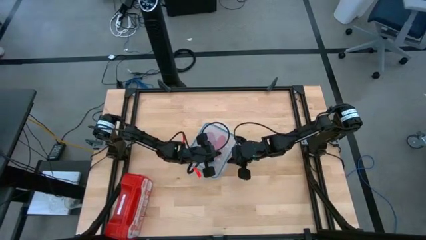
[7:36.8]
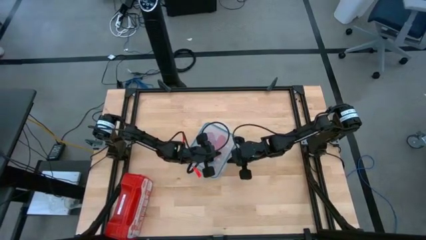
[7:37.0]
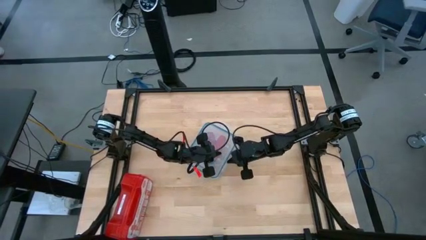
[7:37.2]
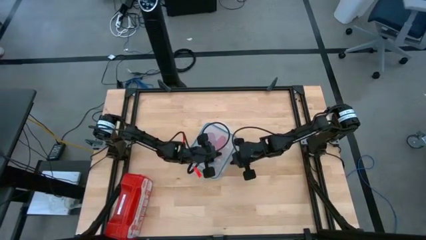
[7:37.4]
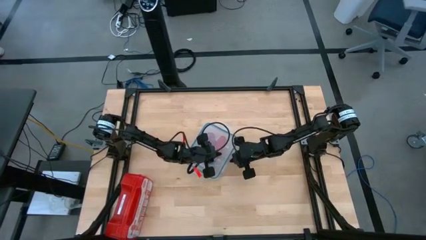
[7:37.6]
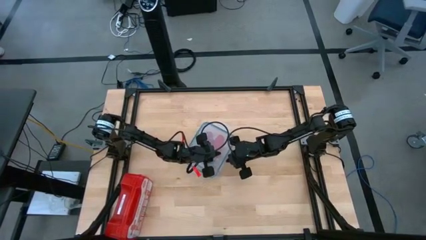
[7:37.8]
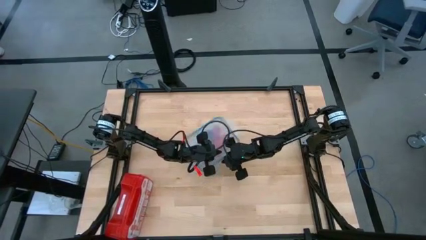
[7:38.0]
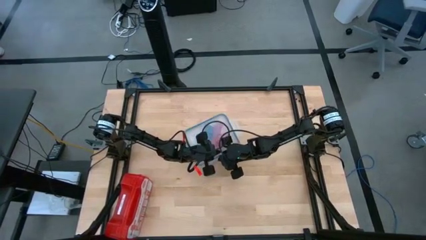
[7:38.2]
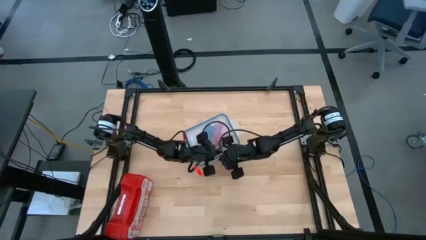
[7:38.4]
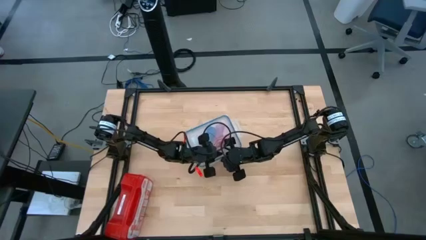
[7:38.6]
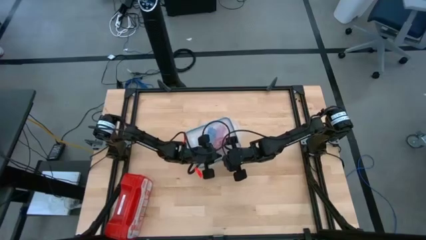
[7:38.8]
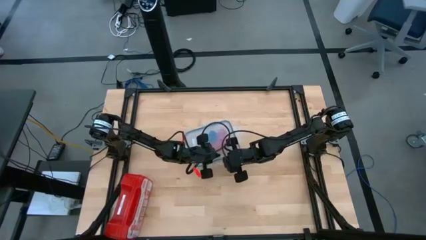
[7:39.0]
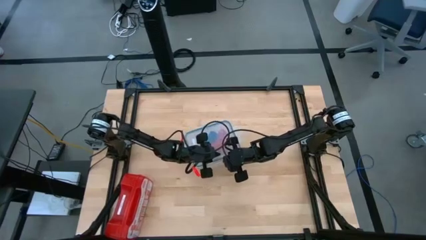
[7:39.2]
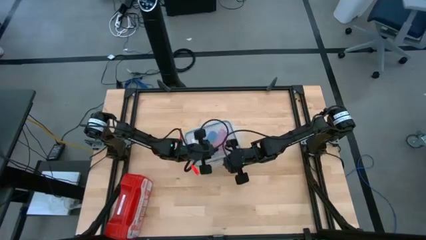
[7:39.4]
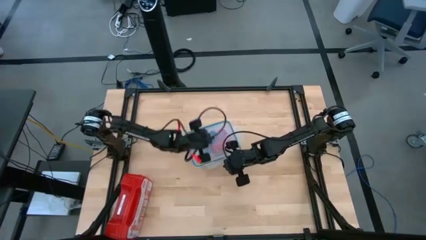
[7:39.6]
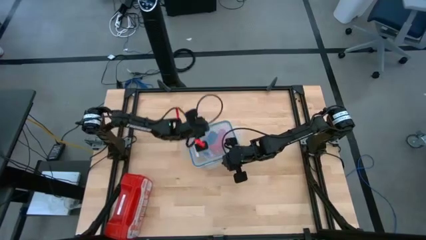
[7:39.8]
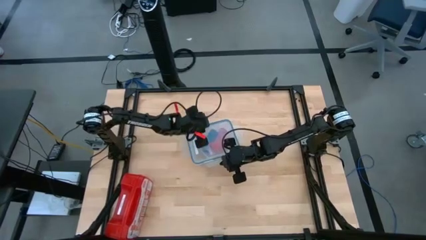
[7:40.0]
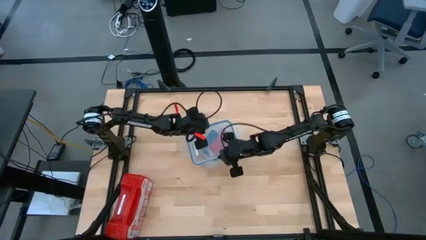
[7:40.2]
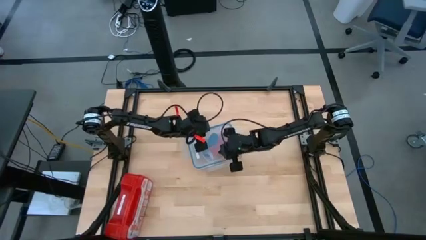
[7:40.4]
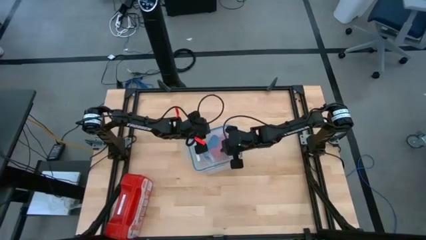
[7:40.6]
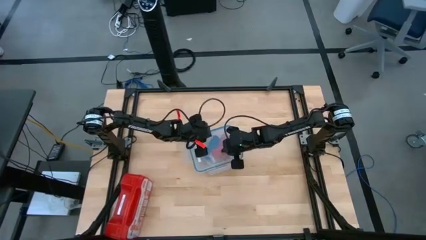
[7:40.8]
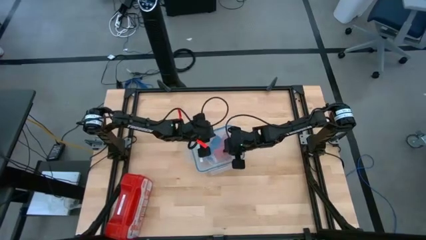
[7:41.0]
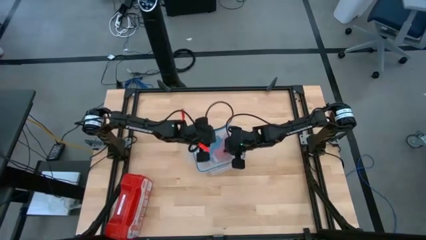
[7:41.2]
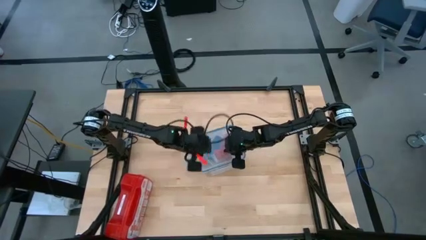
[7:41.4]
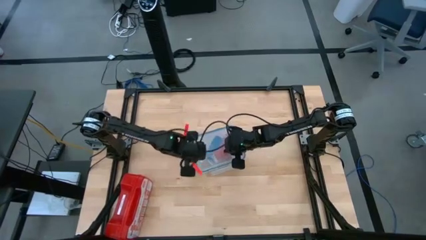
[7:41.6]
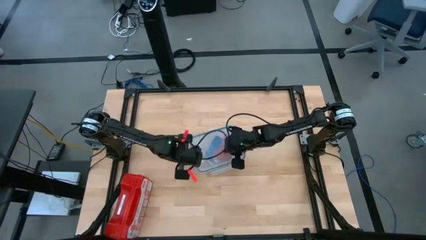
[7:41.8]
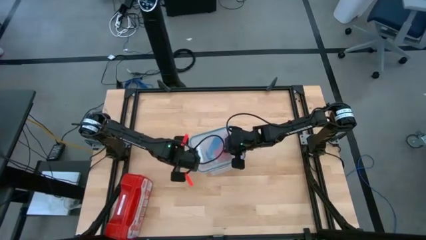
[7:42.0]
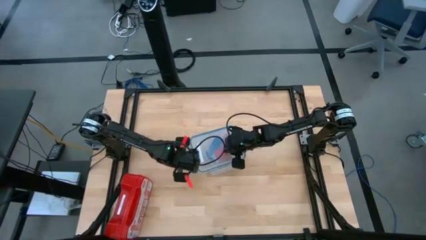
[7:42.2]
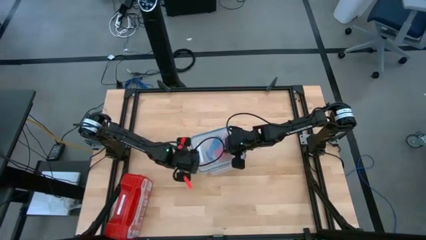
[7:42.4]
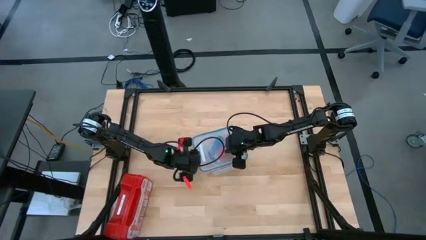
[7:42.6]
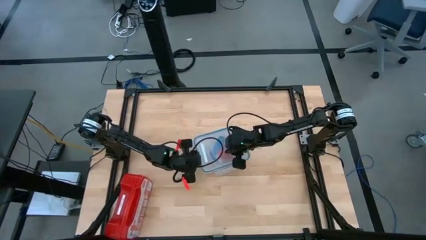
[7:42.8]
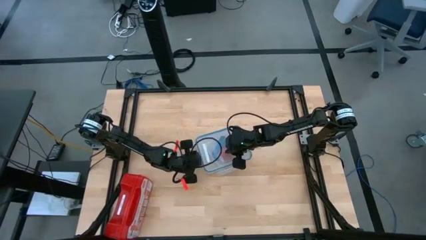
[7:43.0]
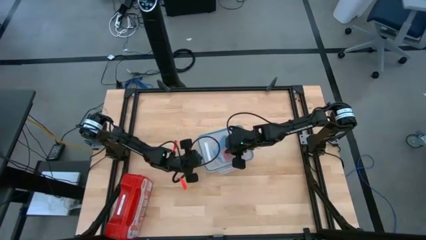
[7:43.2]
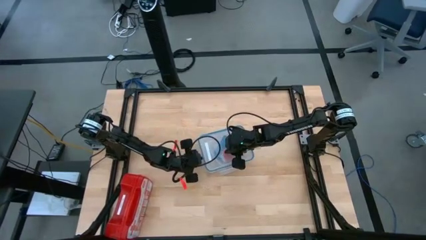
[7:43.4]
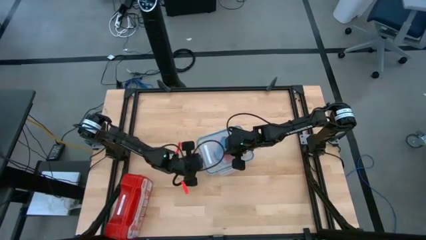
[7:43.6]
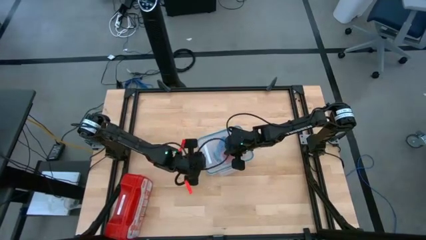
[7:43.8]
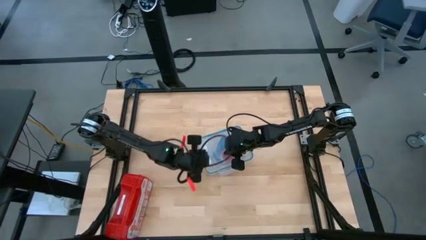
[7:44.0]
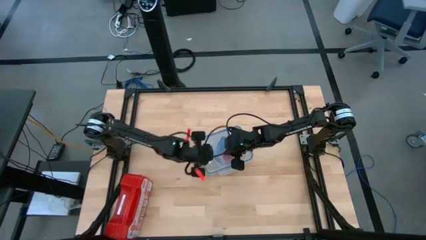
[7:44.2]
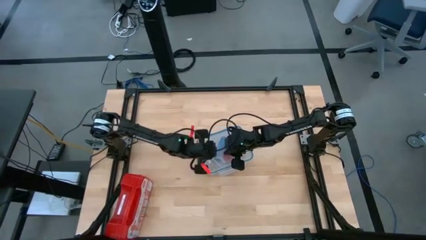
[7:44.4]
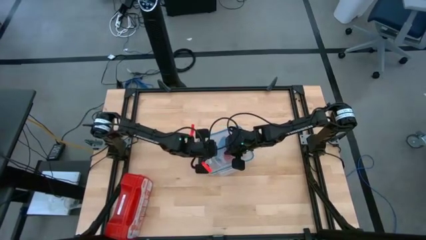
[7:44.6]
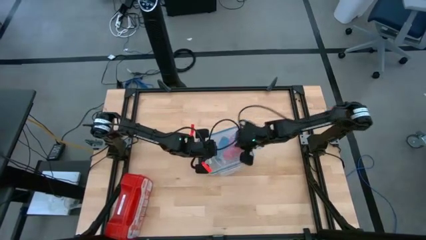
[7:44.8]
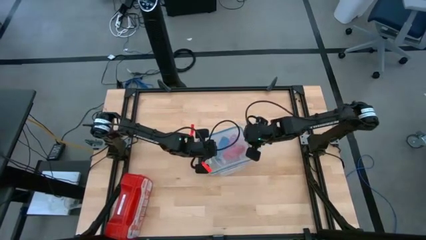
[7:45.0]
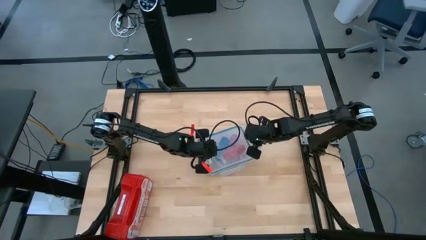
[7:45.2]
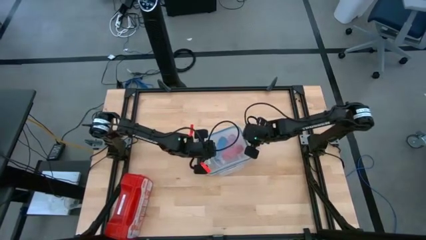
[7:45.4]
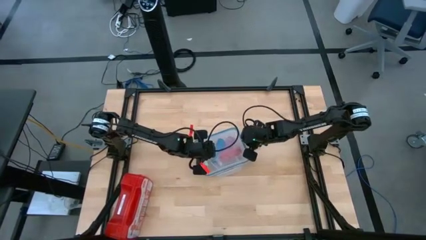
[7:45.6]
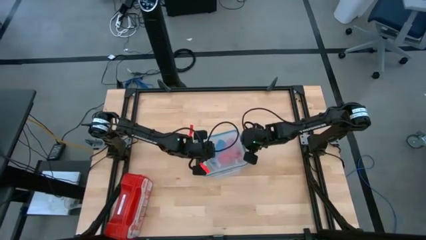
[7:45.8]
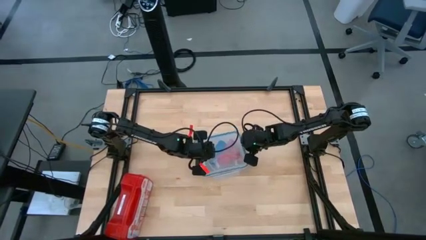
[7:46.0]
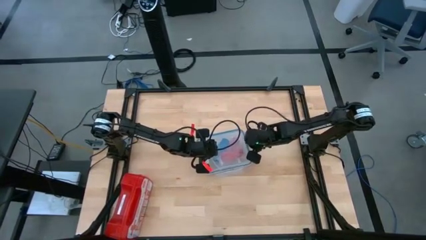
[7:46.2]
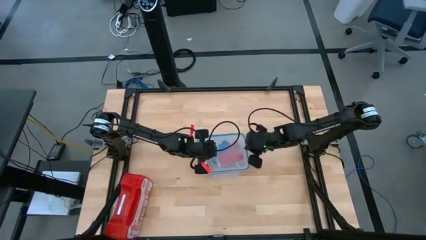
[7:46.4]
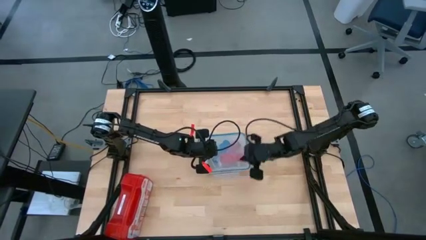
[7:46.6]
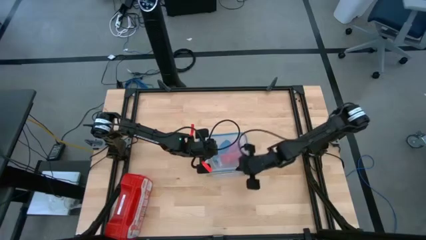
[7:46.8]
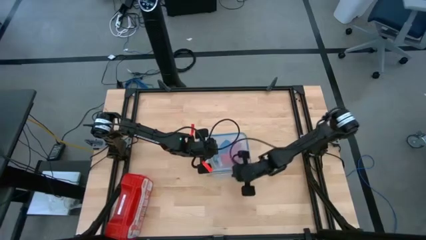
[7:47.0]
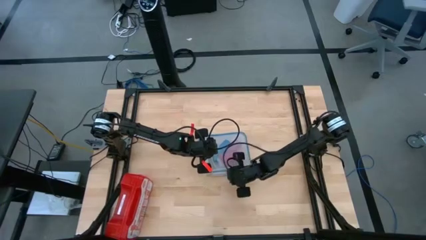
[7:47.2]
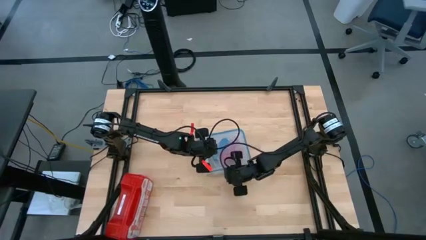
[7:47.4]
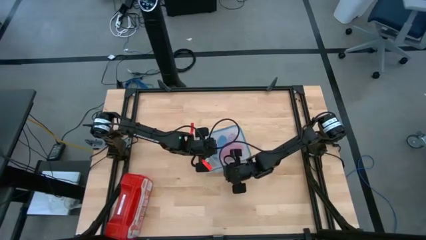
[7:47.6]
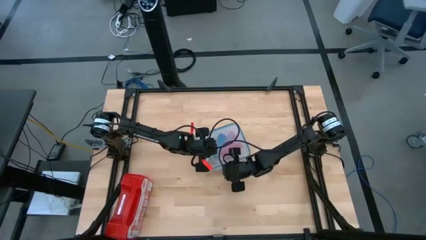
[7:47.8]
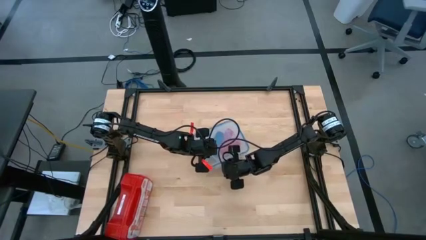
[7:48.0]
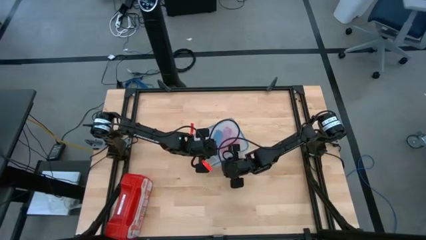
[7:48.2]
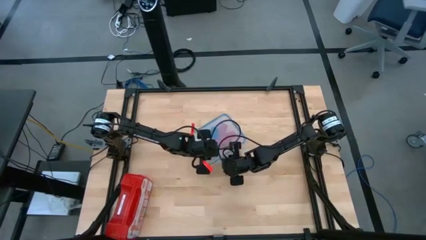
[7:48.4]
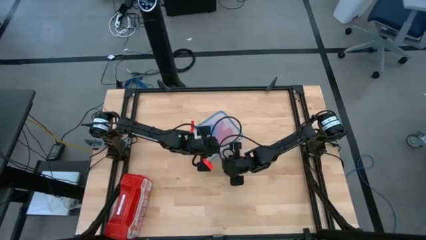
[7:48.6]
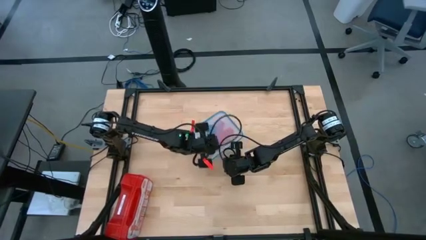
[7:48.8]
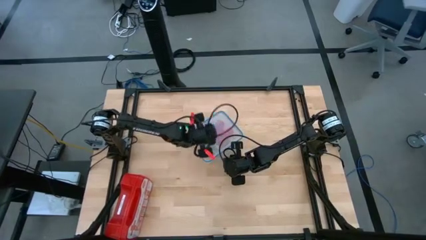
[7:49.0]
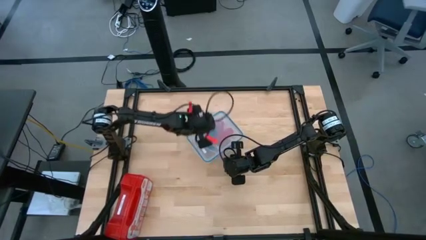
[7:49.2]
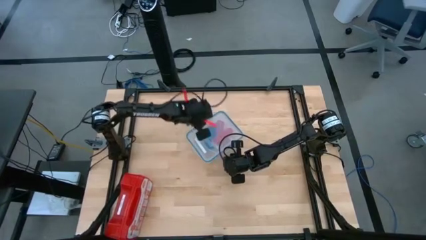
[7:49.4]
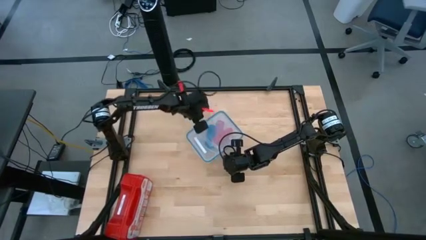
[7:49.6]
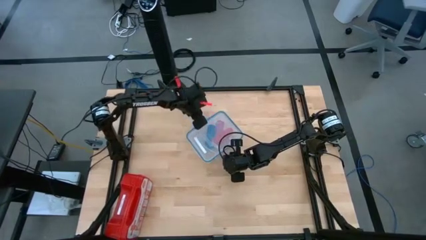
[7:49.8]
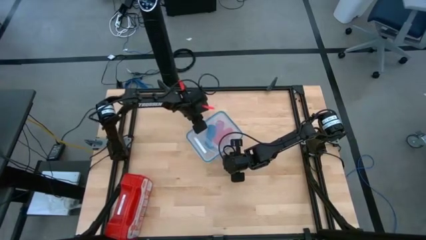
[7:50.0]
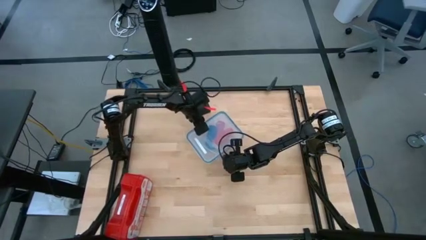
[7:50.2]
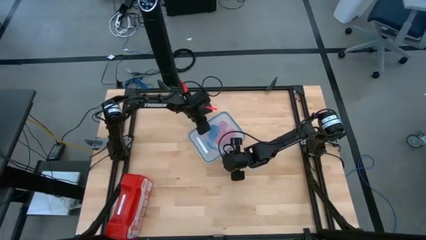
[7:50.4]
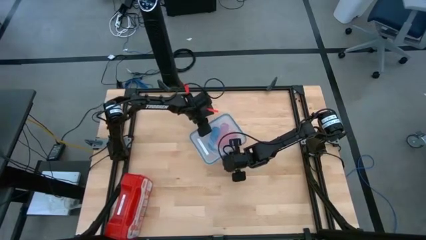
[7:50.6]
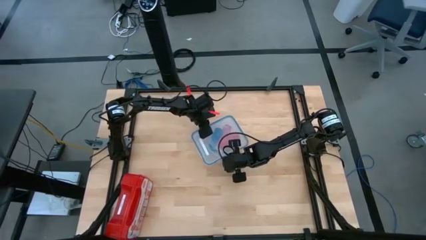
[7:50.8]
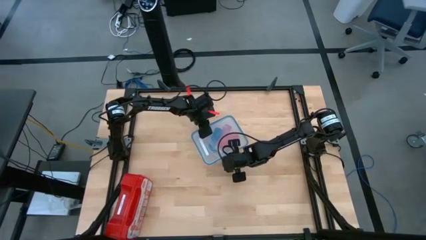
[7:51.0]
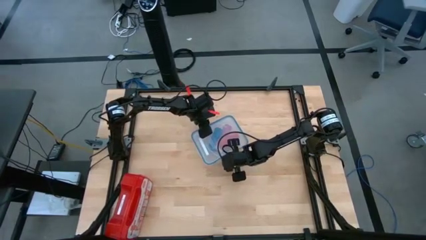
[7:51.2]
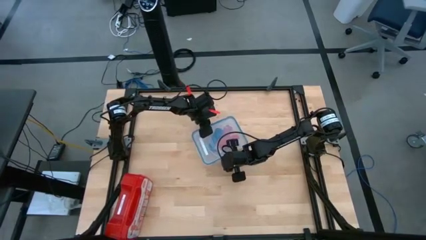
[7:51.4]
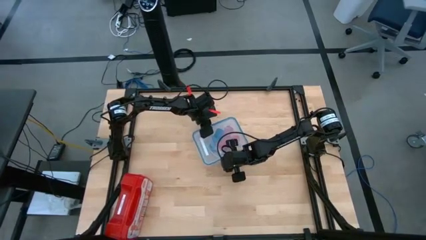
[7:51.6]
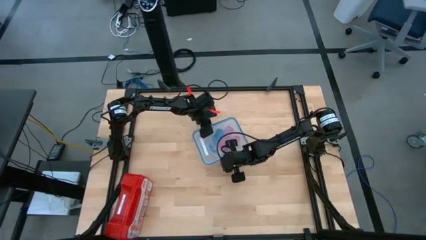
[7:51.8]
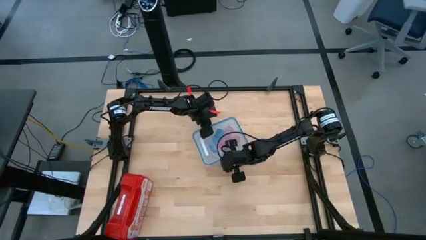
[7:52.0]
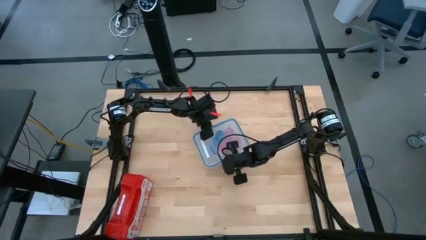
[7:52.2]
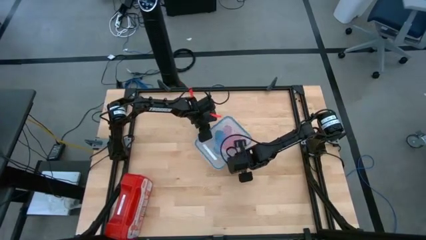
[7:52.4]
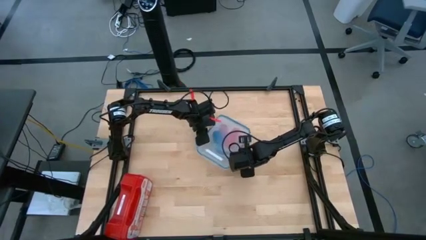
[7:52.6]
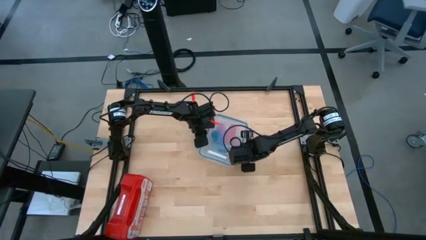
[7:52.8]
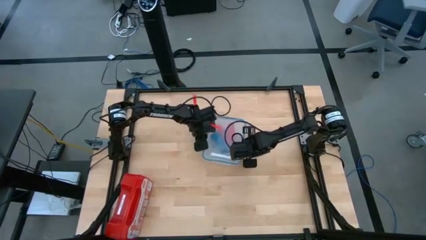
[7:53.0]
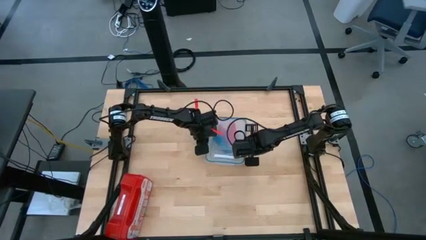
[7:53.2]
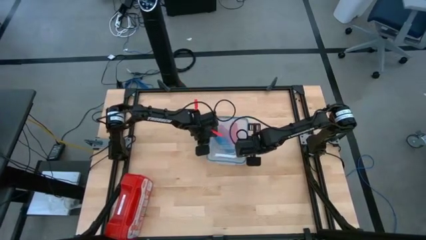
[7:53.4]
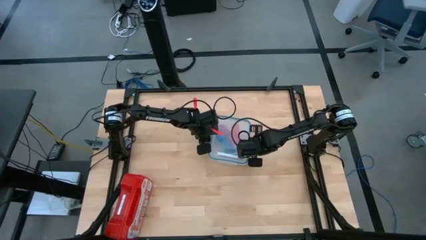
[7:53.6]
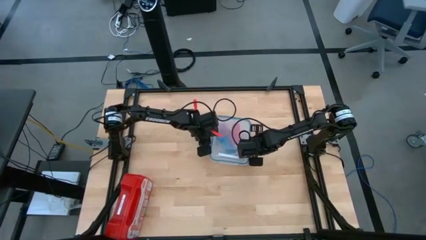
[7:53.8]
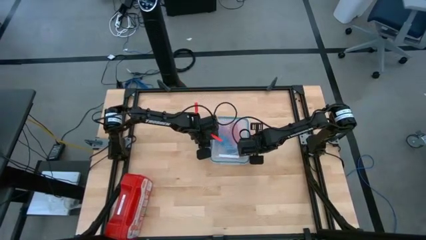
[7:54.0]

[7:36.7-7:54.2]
Task: Roll bandage
Close the transparent container
